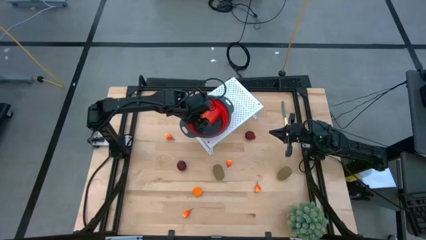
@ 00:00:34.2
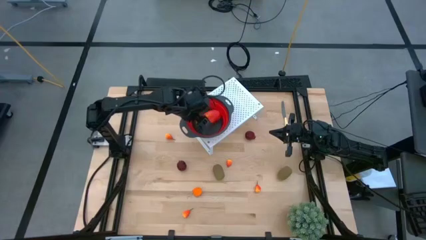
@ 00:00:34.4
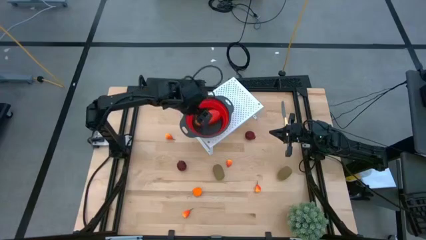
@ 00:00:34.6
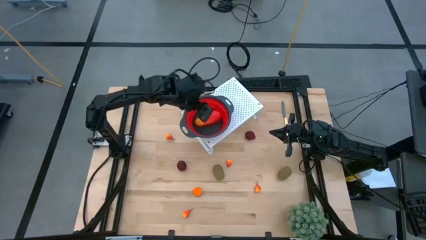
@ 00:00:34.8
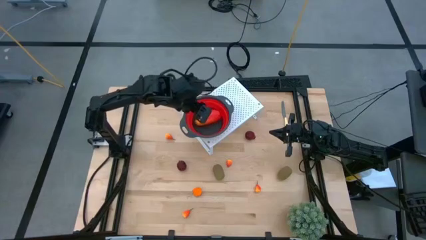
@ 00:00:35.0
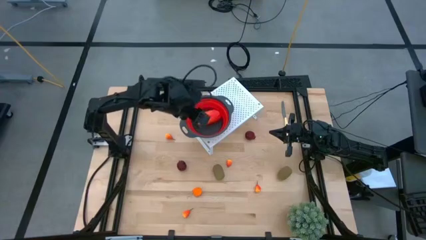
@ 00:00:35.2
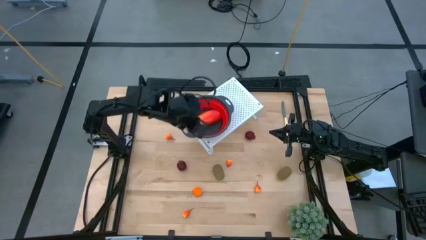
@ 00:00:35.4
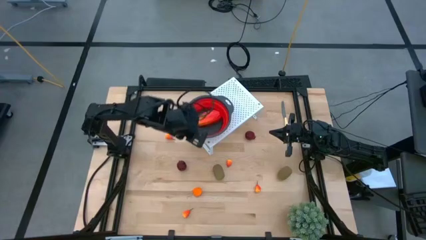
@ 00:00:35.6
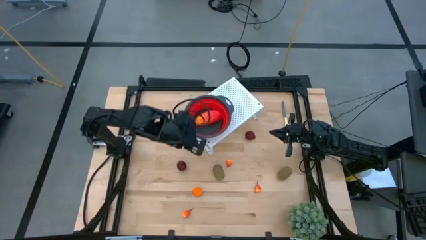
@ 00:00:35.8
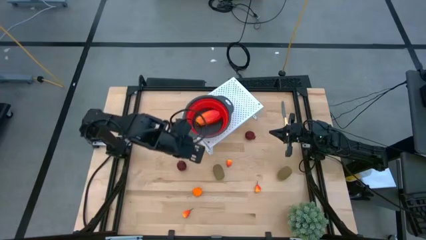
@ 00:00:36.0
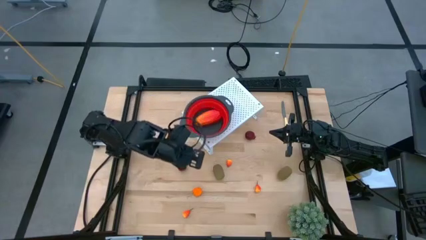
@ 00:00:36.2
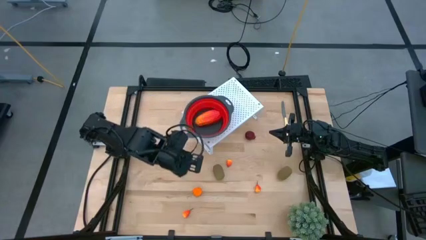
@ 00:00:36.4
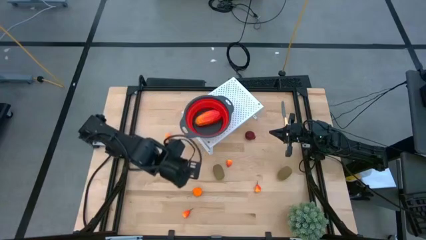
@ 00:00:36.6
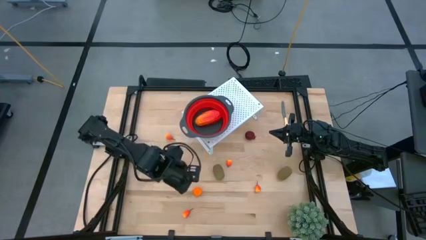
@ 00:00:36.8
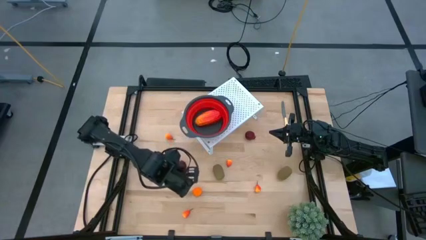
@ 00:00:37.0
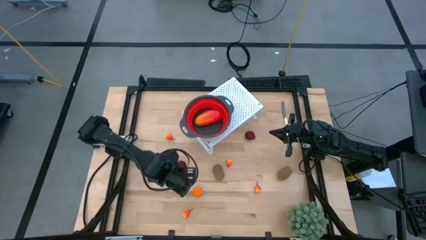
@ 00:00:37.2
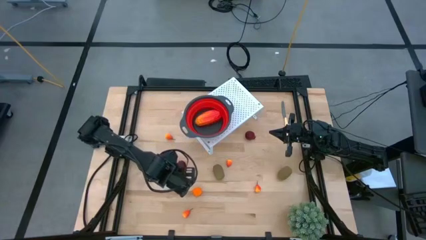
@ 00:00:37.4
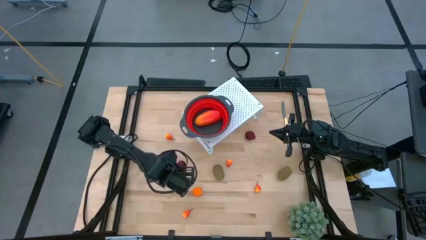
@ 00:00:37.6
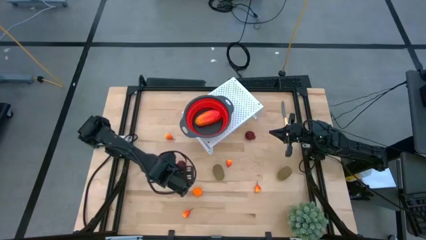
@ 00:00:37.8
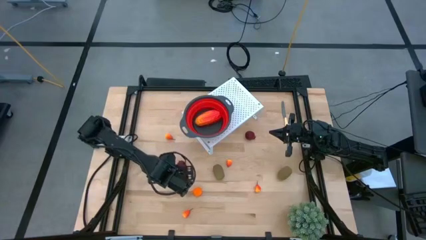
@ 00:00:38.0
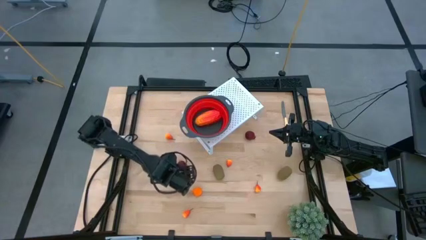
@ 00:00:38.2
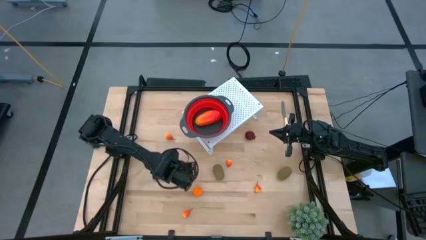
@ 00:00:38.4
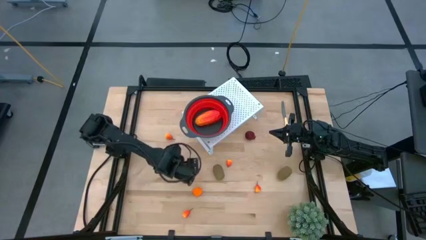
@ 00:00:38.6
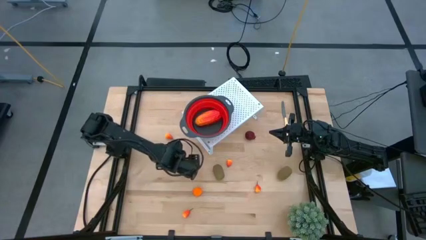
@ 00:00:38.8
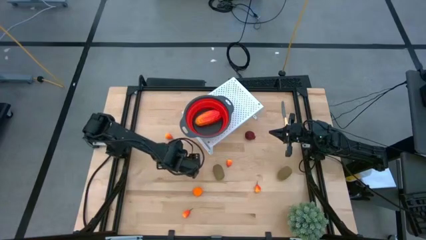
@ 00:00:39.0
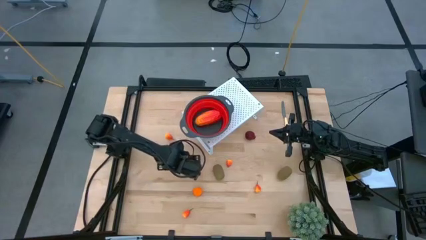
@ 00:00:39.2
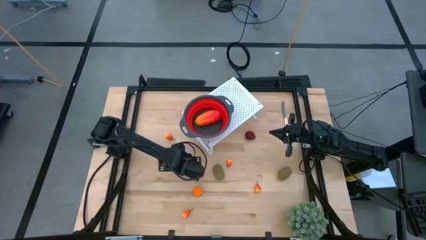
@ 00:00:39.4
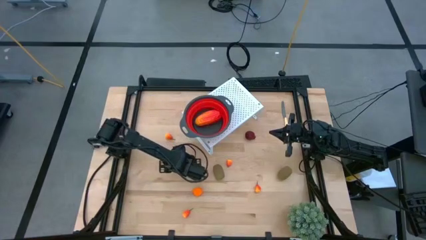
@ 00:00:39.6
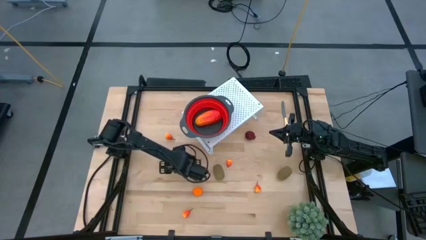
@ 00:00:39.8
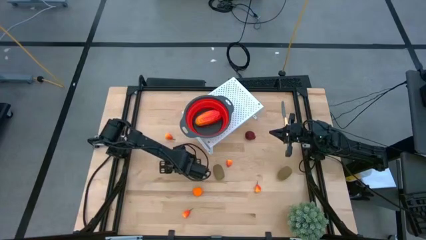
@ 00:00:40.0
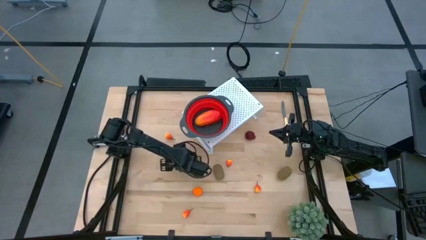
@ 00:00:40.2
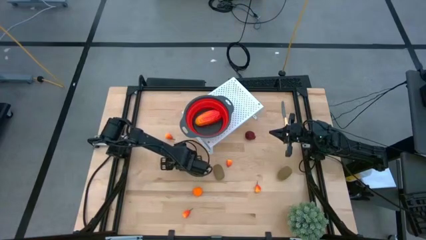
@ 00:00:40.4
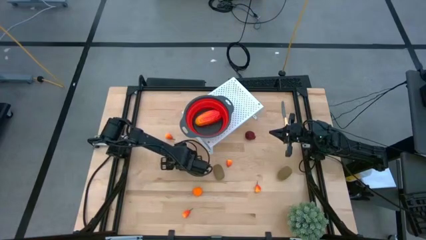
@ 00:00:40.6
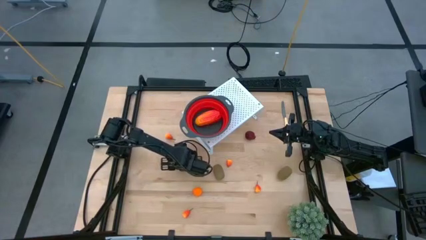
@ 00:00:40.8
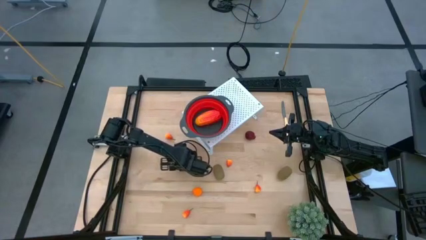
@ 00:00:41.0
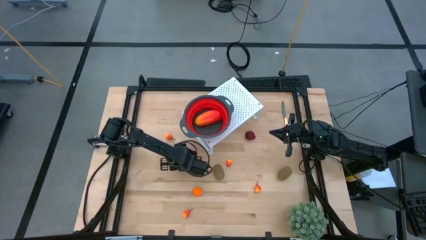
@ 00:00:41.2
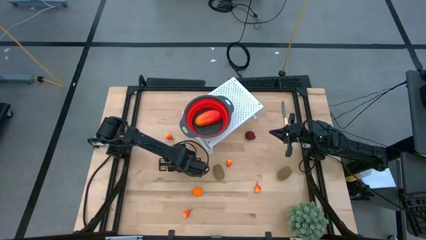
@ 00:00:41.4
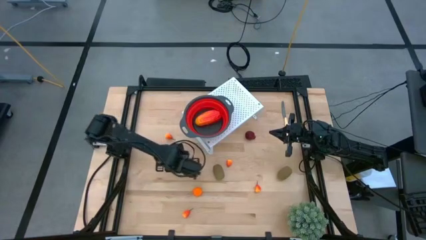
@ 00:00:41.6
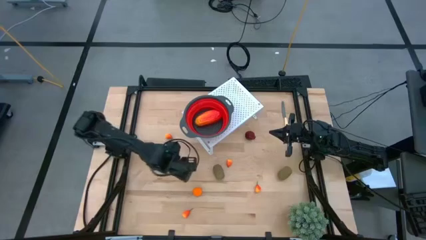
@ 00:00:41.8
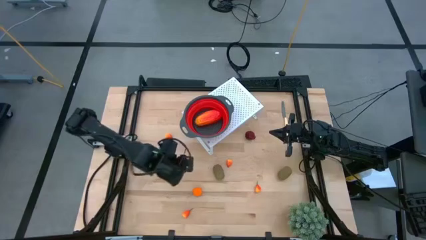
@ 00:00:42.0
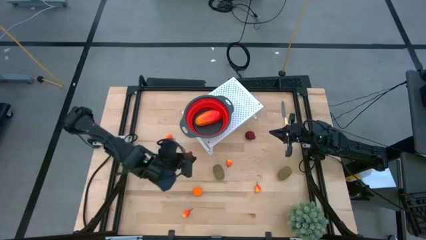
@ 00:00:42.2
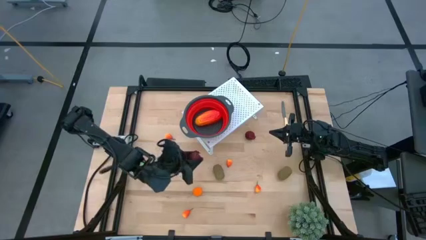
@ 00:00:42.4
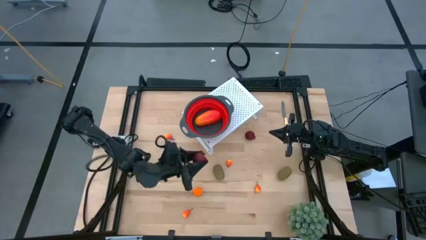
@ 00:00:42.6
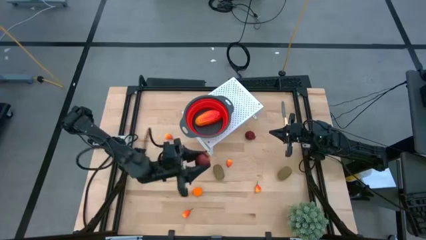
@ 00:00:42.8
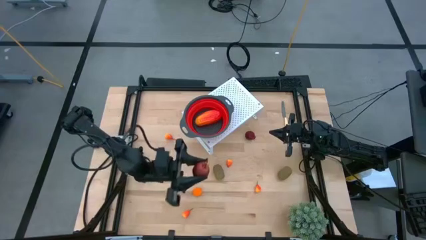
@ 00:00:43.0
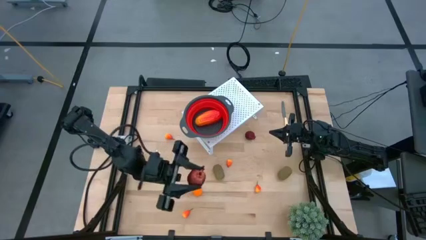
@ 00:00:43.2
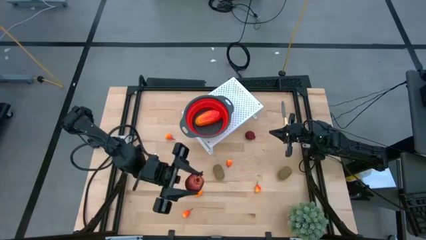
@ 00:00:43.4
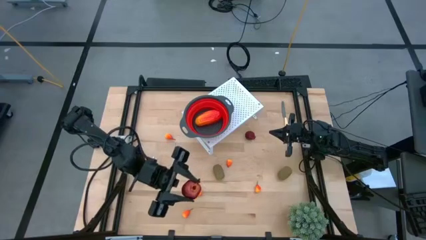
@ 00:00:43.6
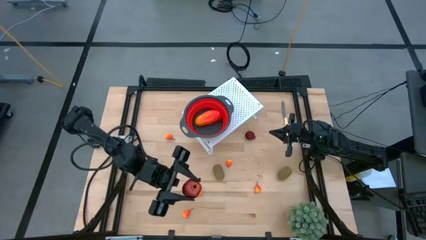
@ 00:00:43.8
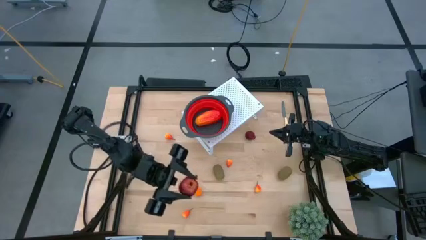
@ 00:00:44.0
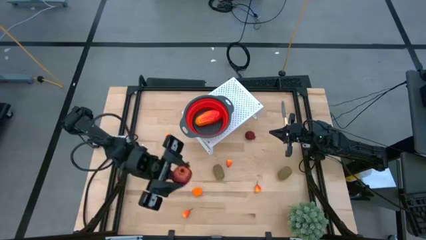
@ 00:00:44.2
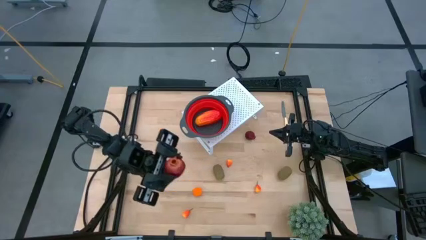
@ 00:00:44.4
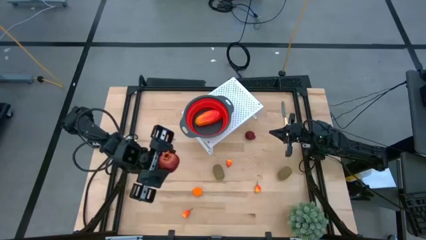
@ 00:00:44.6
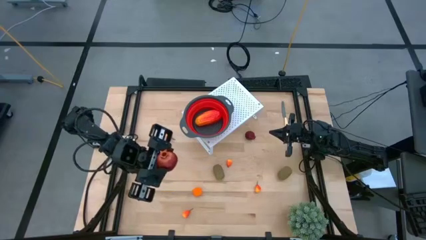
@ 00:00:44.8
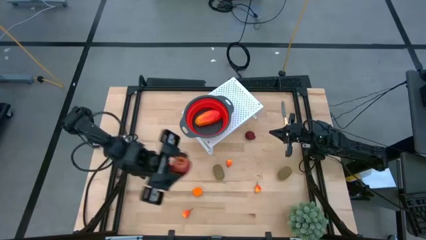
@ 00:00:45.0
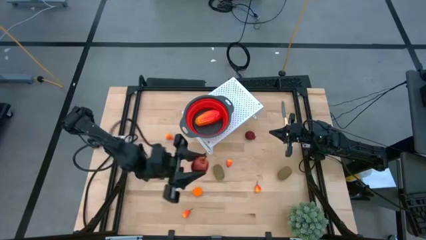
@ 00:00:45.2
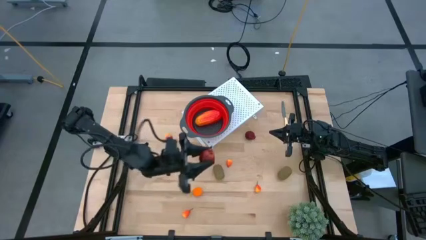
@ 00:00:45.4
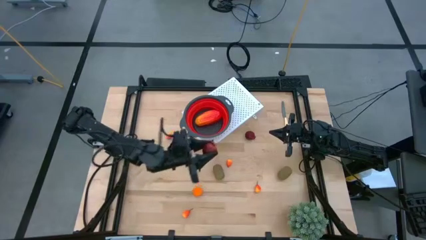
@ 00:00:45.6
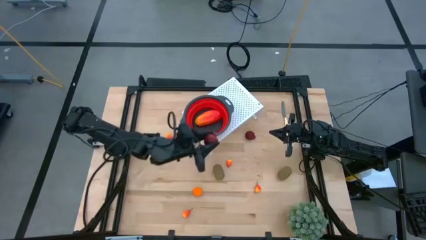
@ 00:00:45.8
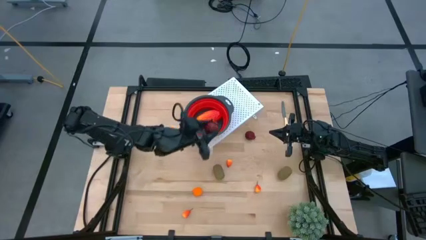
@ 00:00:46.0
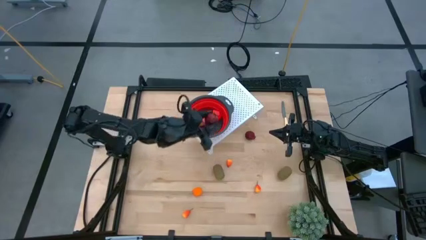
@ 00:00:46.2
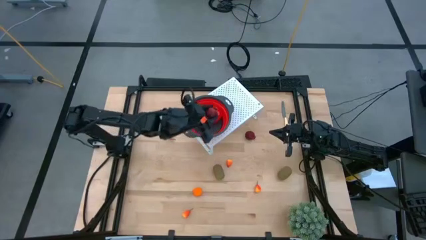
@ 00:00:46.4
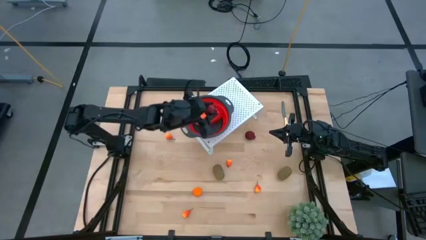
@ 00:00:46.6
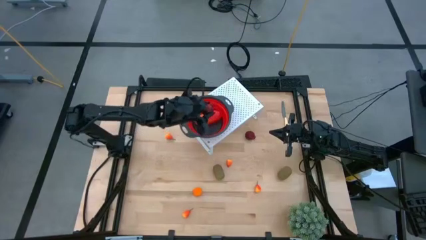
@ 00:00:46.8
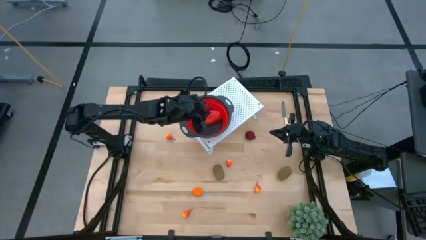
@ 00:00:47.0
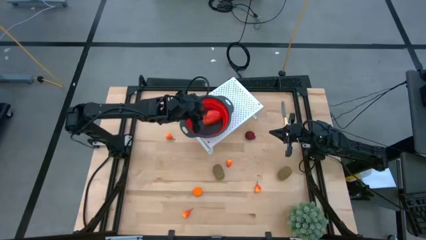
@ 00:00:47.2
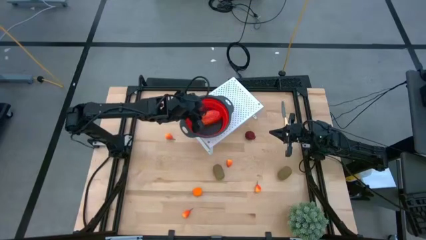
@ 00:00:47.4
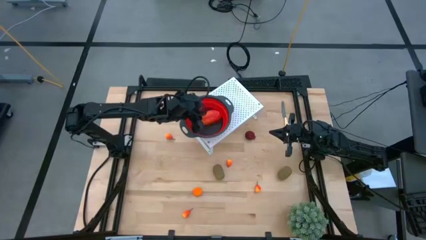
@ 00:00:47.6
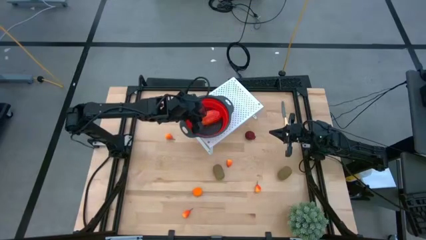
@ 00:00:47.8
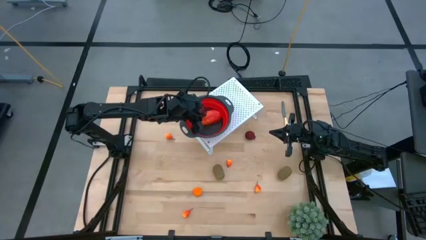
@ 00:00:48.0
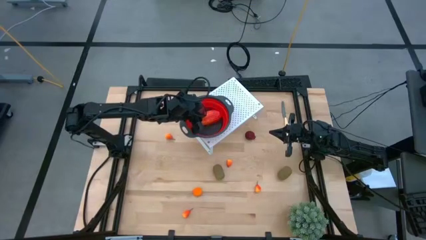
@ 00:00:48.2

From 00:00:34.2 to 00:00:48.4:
Task: Pick & Place Fruit
Put the pomegranate into the red strainer bowl on the shelf
